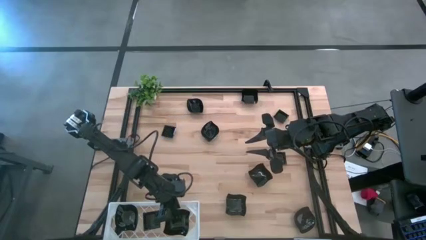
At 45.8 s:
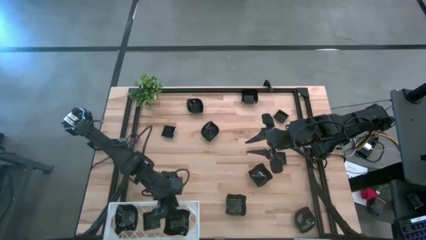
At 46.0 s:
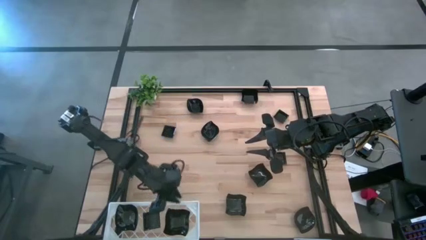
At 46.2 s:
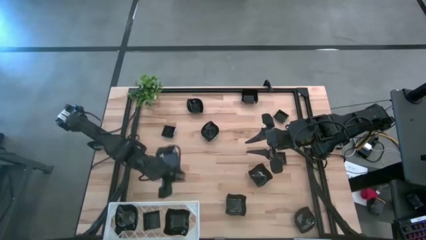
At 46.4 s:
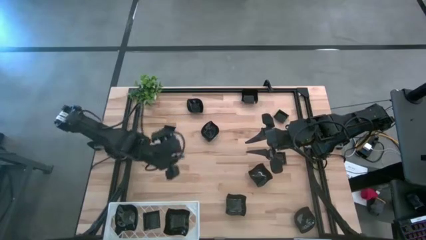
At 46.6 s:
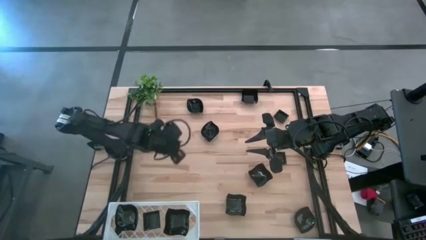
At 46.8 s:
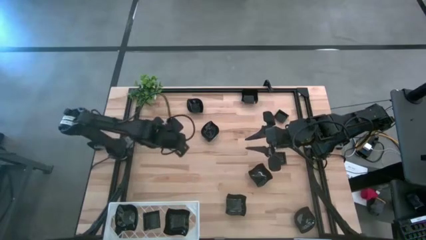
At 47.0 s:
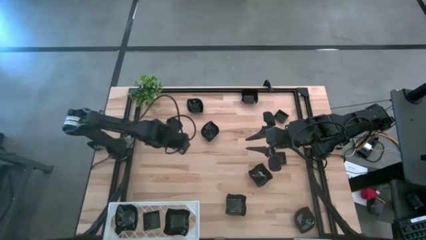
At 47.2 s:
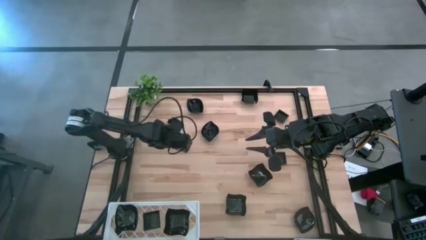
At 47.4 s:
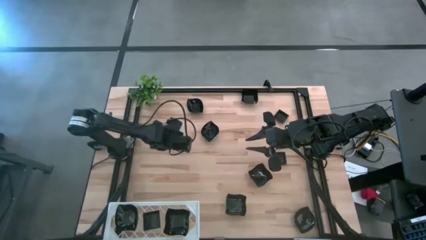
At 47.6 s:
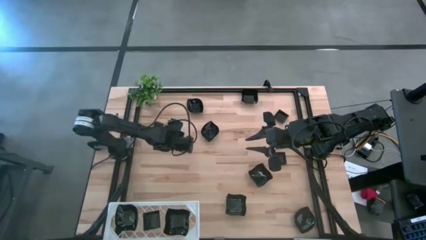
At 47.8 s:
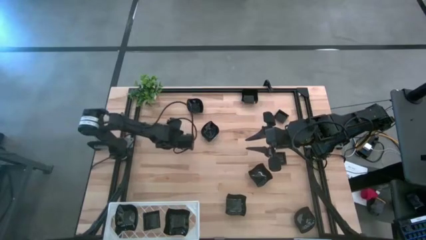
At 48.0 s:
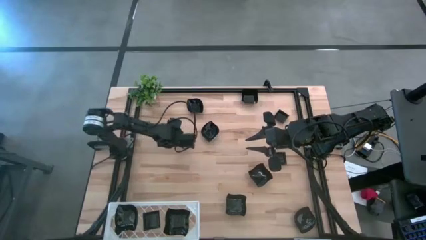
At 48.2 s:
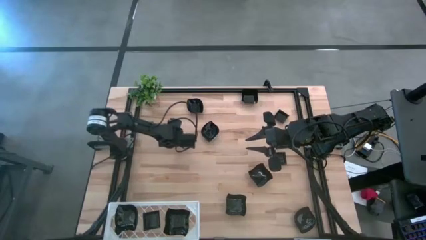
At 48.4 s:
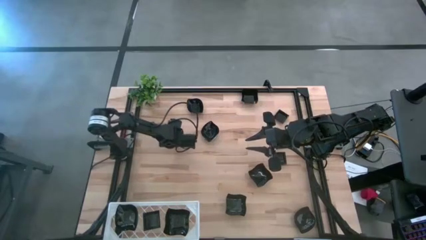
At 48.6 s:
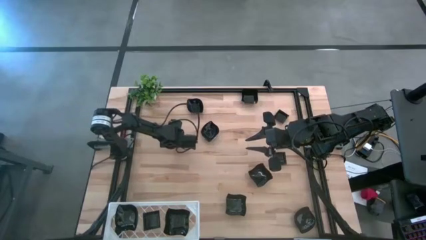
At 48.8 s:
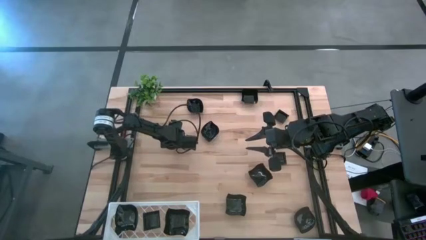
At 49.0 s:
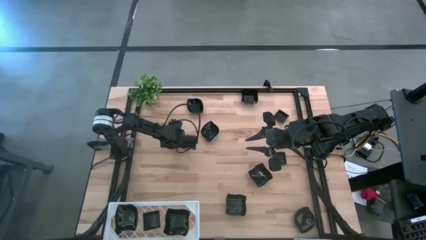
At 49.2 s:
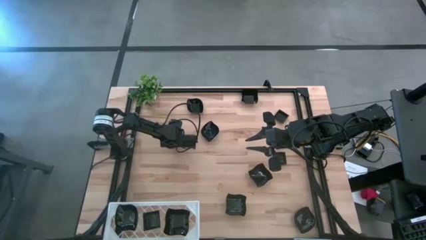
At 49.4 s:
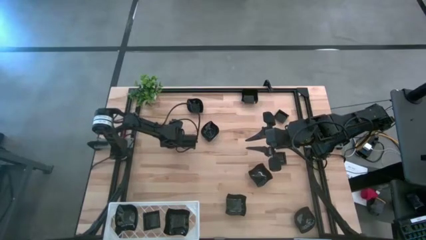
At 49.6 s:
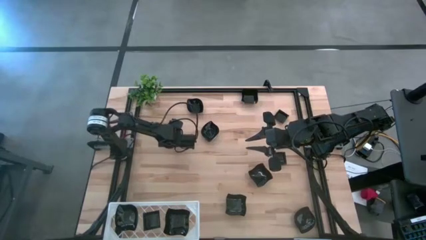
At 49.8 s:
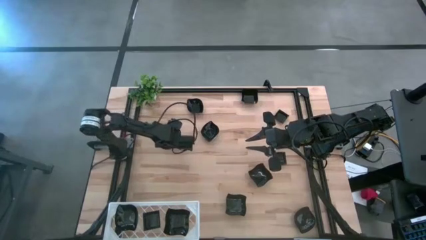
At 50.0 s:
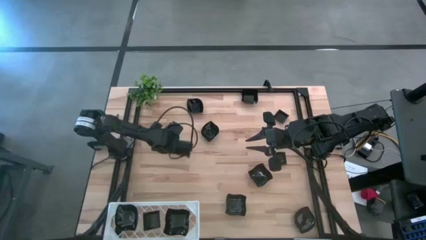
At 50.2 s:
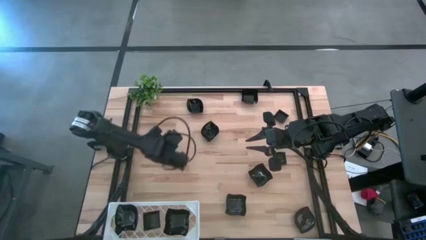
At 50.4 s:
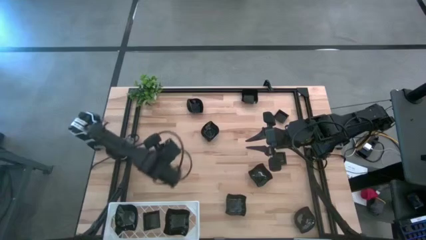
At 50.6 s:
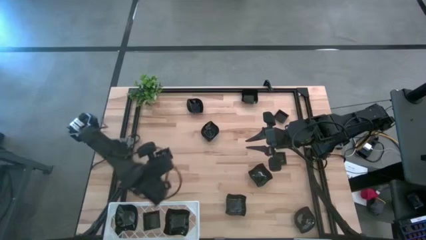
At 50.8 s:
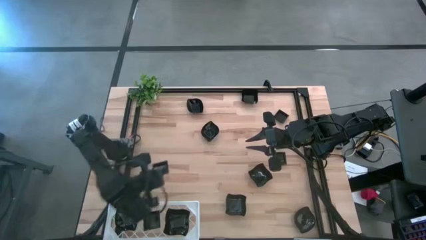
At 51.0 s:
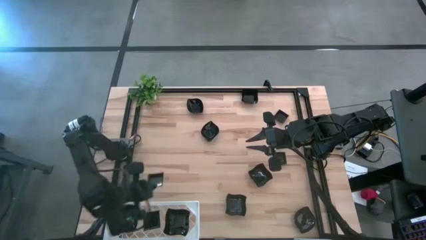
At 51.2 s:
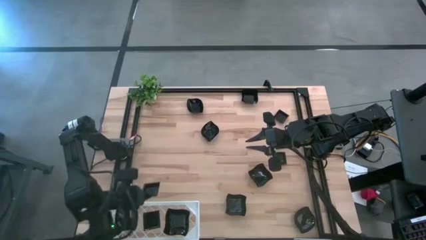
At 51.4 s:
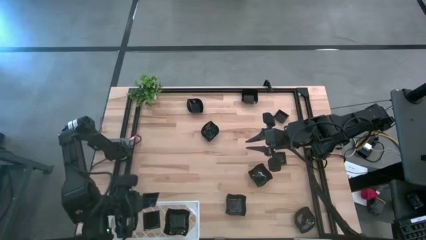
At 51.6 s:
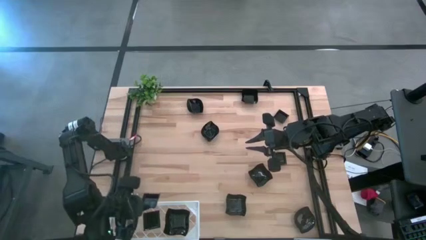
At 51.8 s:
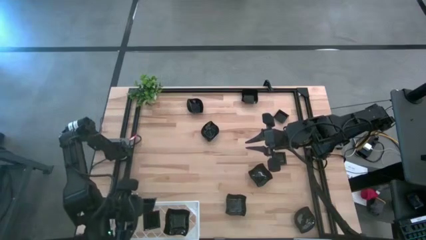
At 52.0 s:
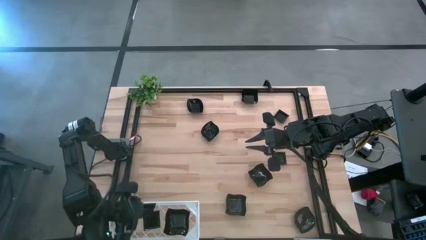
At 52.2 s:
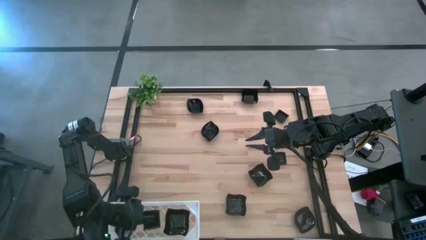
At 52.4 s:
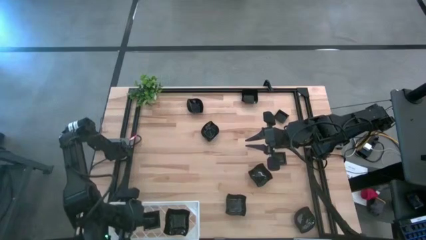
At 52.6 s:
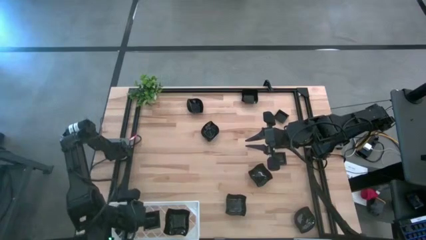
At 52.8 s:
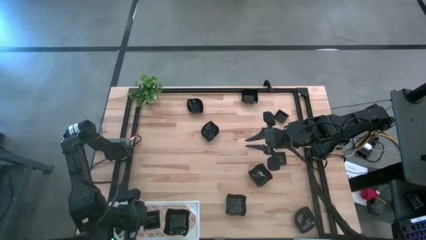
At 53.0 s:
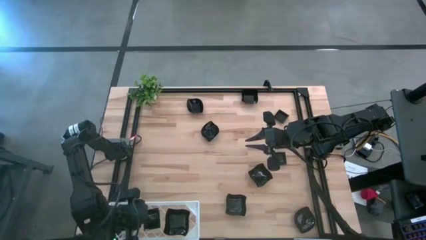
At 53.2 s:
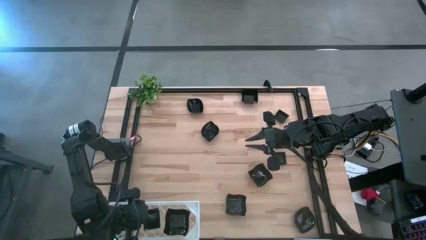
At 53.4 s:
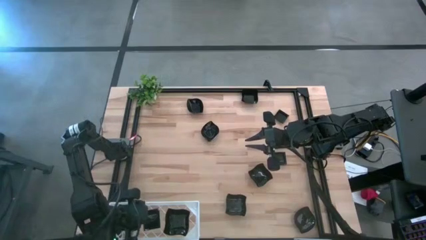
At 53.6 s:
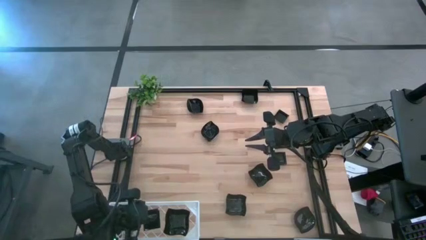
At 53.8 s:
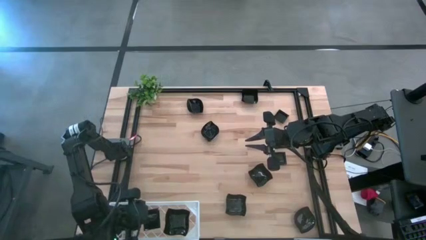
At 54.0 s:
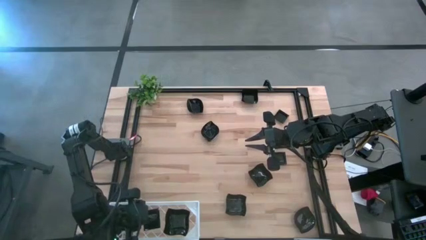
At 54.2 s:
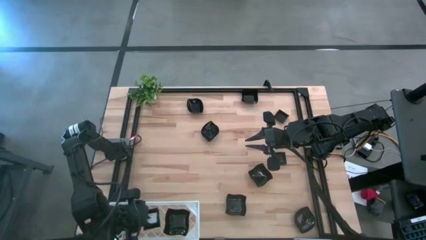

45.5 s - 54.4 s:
Task: Pick & Place Mini shaped plates
Stack the black square plate on top of the other black square plate on the shelf
